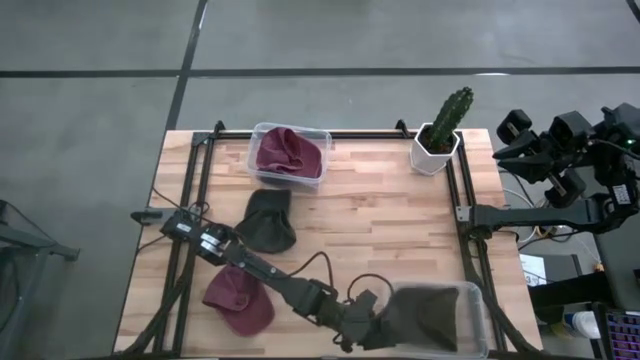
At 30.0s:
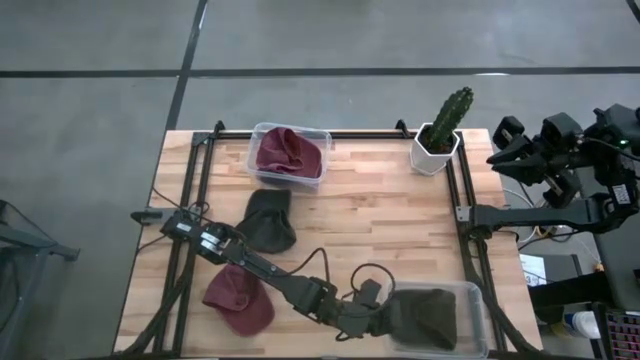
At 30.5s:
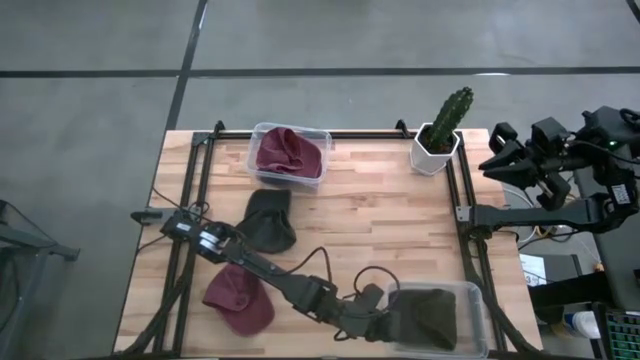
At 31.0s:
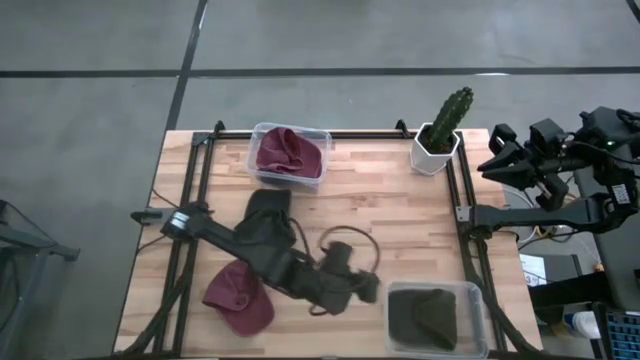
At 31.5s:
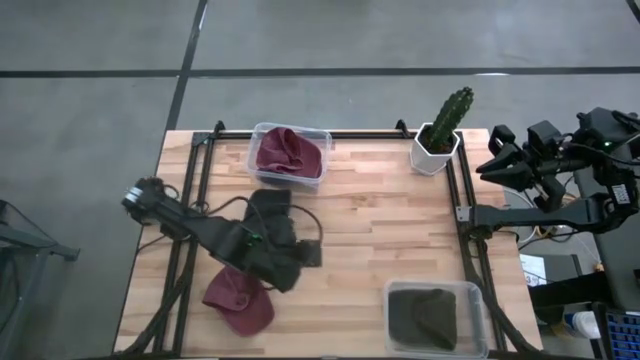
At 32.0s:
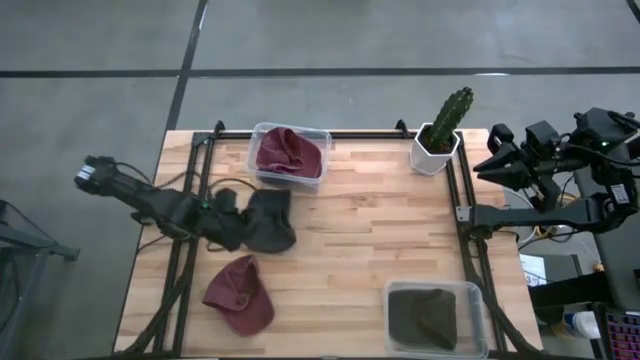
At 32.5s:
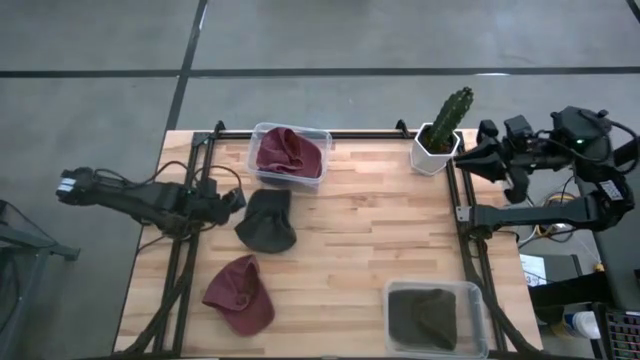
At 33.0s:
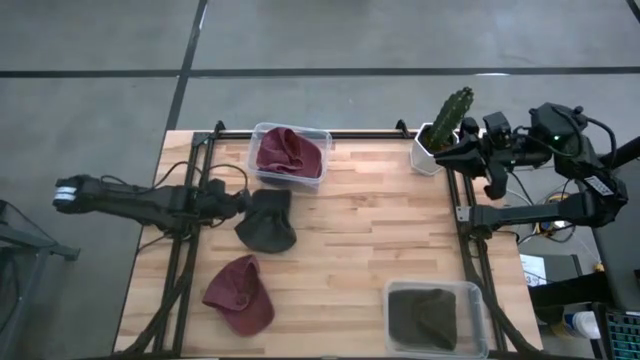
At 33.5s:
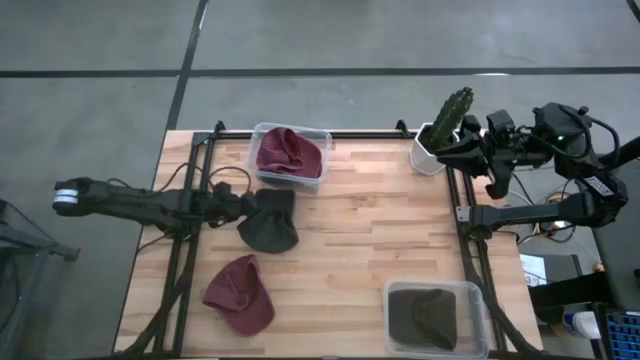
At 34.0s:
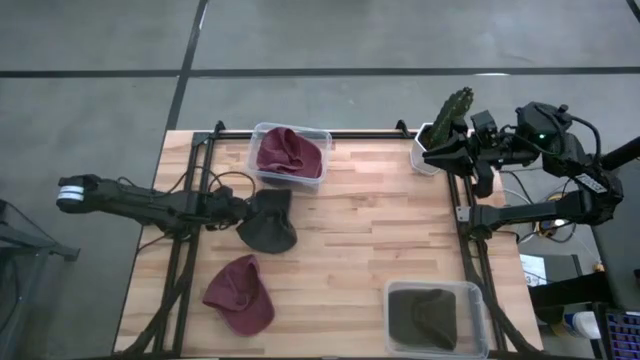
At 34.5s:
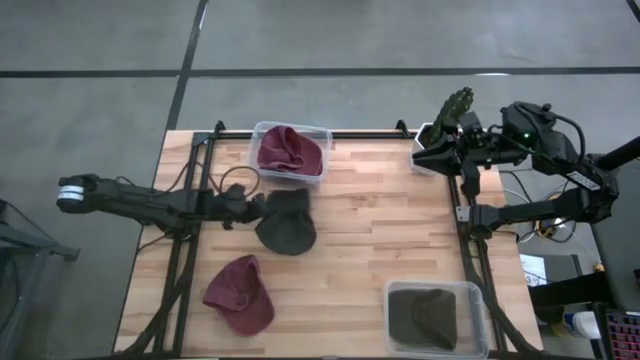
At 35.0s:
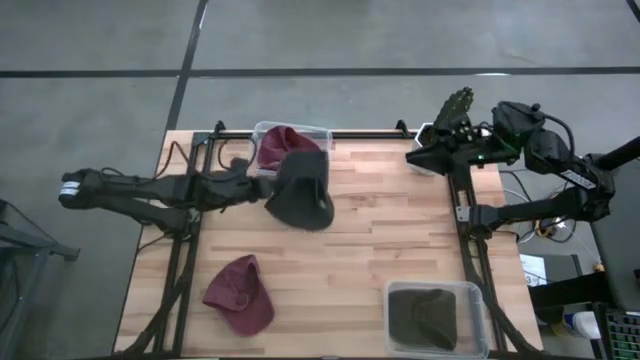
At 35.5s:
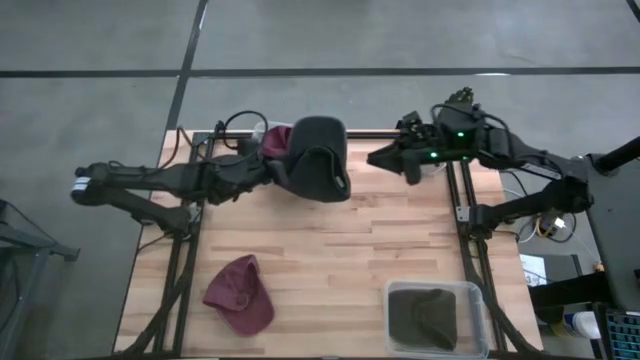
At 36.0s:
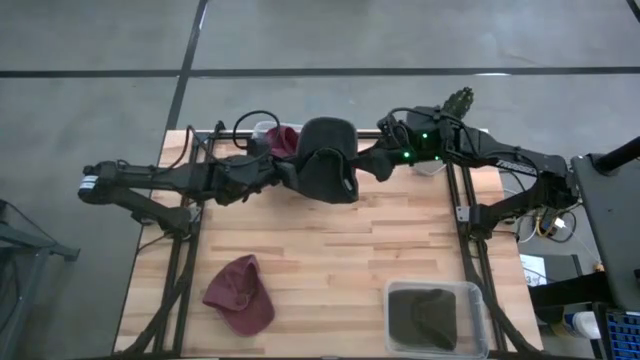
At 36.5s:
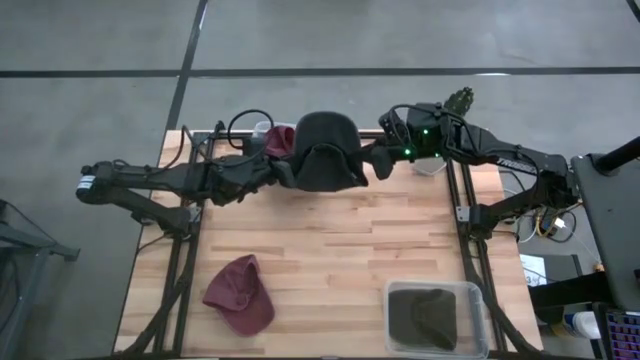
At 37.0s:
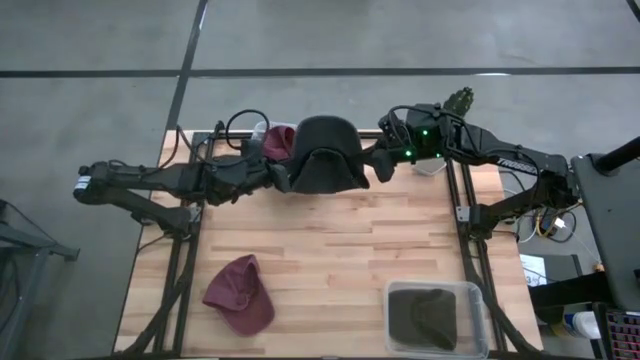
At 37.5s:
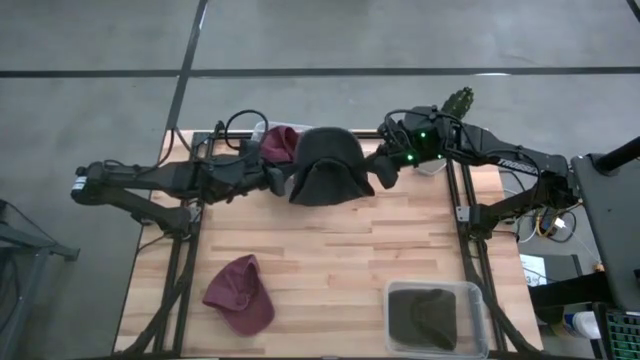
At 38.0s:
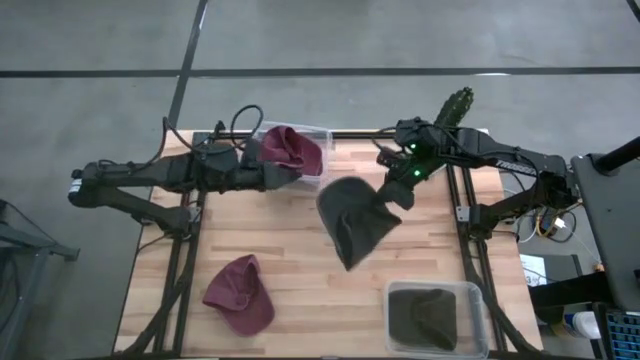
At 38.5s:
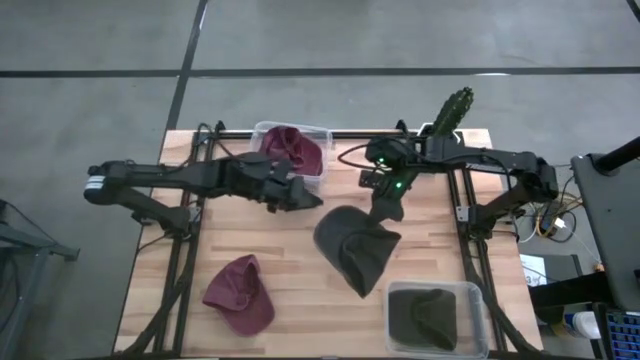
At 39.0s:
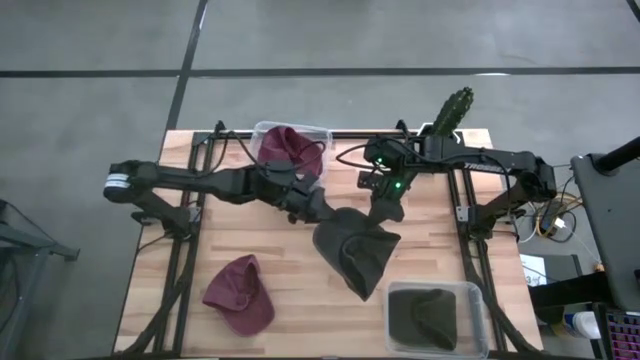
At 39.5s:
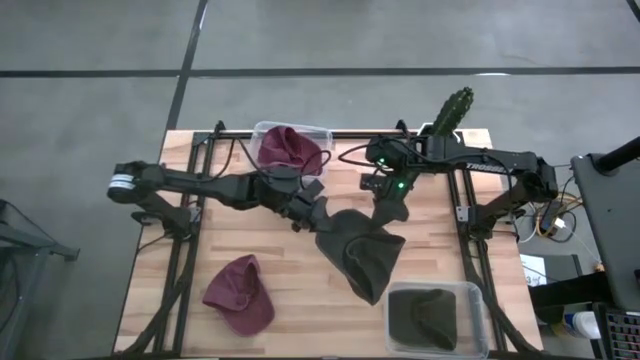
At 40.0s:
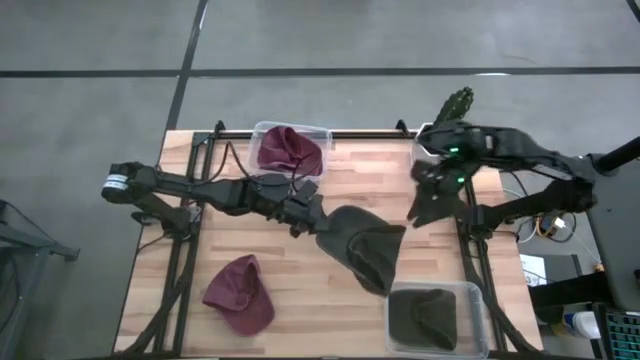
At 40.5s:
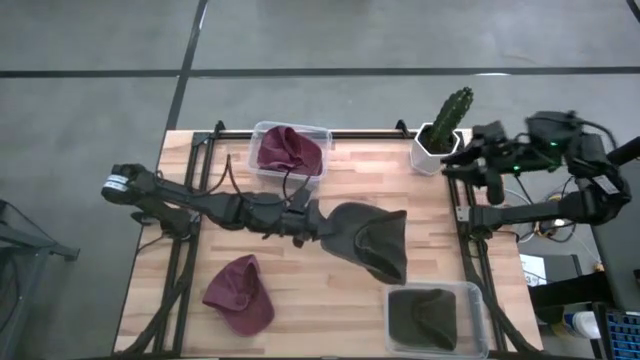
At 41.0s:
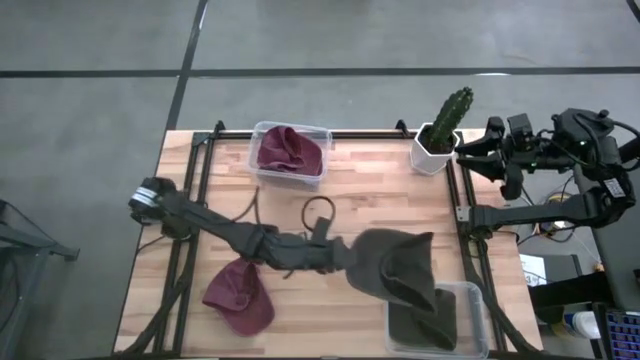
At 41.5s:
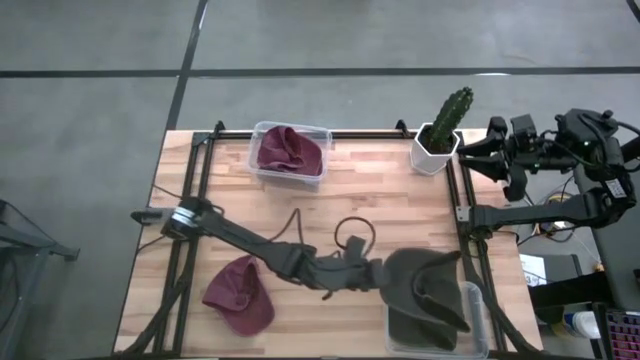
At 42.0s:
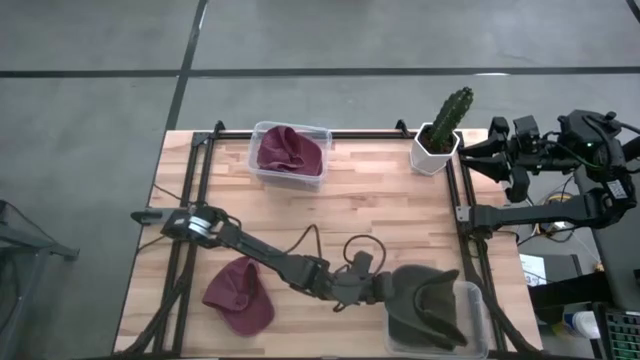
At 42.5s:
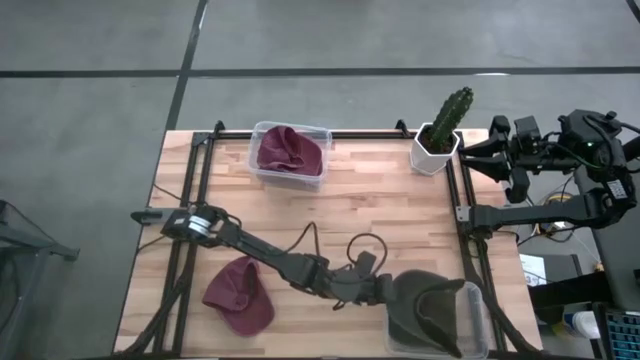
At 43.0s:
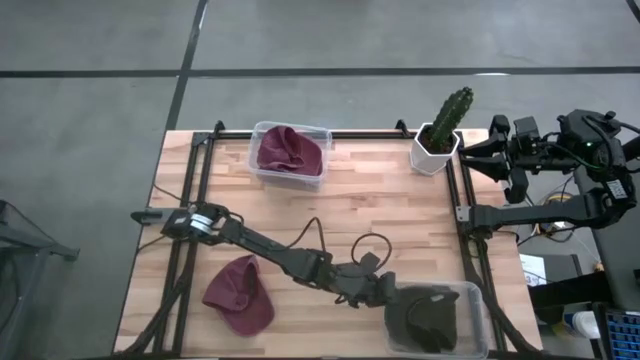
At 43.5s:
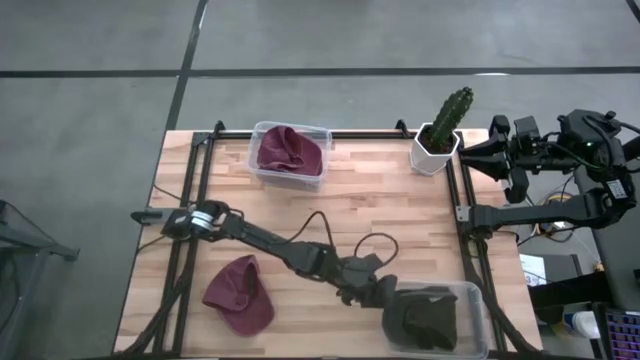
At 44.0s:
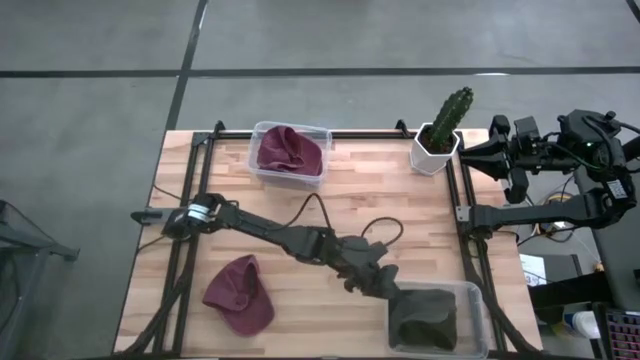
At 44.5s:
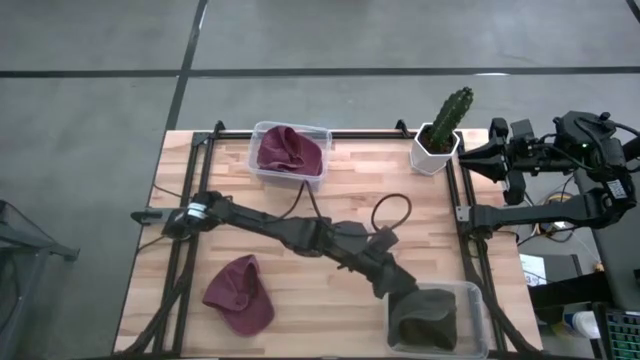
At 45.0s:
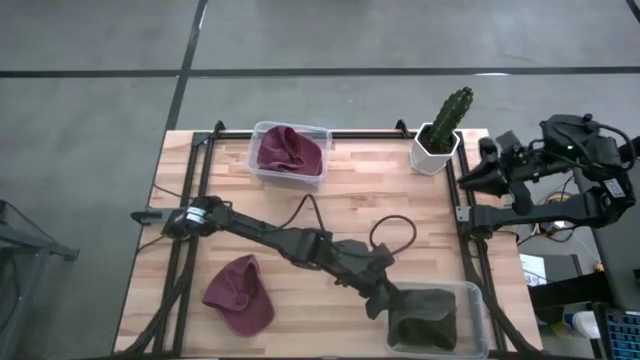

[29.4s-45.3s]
Task: Pick and place caps into container
Put the black cap into the bottom transparent container

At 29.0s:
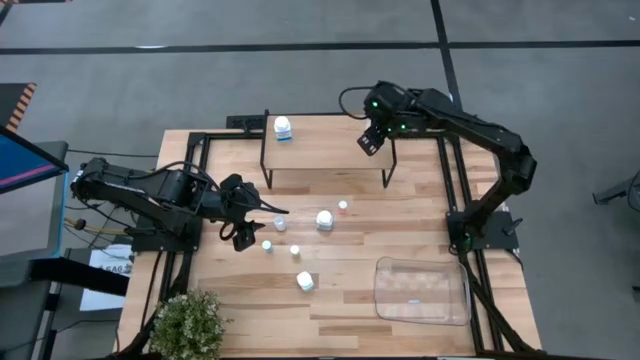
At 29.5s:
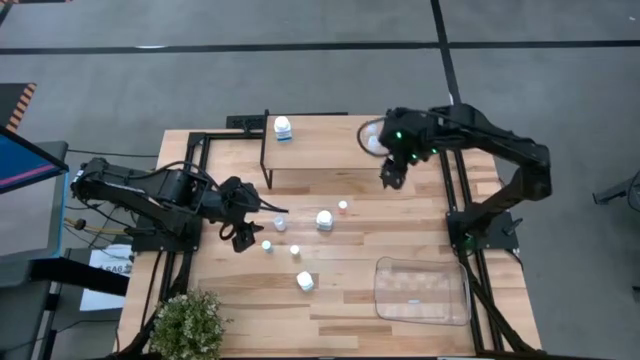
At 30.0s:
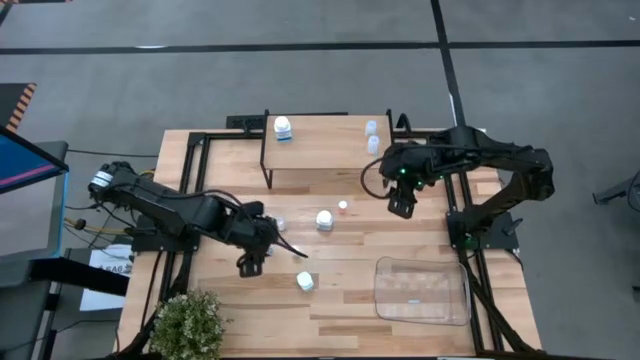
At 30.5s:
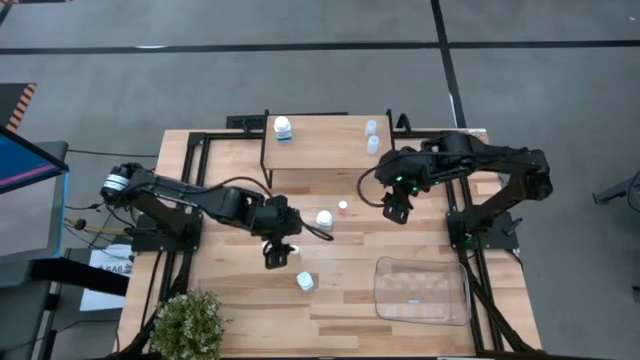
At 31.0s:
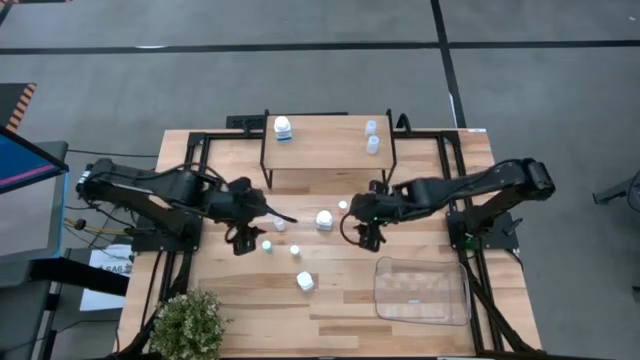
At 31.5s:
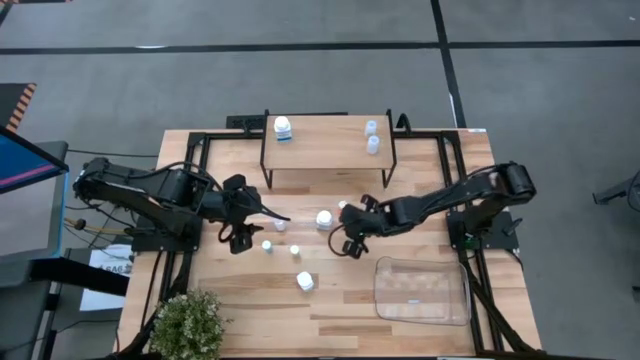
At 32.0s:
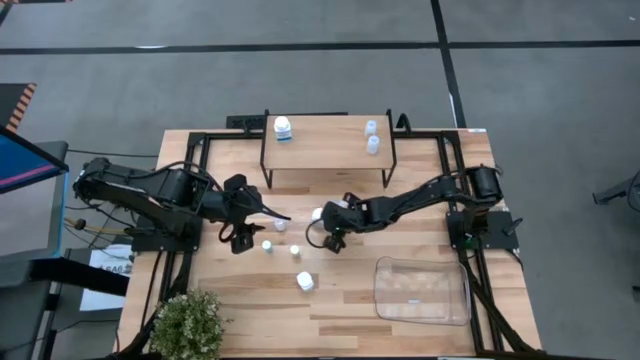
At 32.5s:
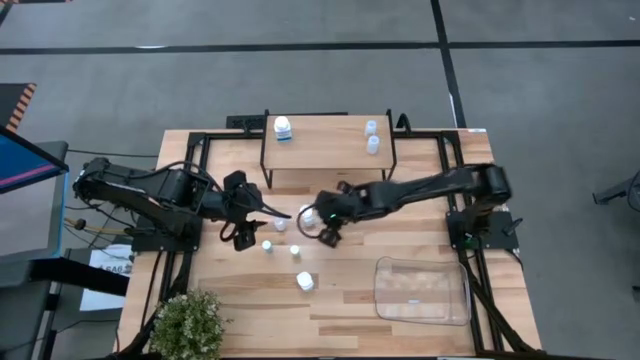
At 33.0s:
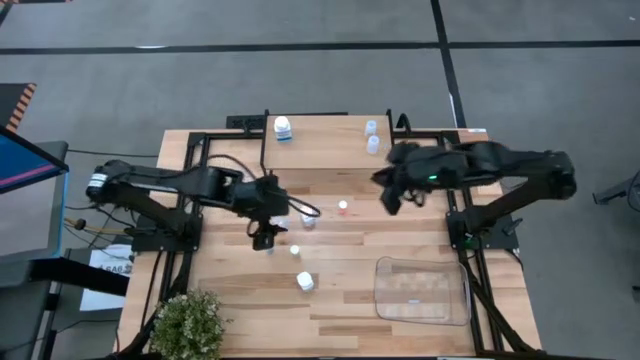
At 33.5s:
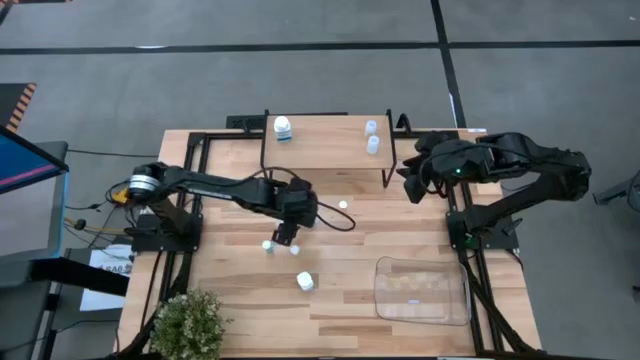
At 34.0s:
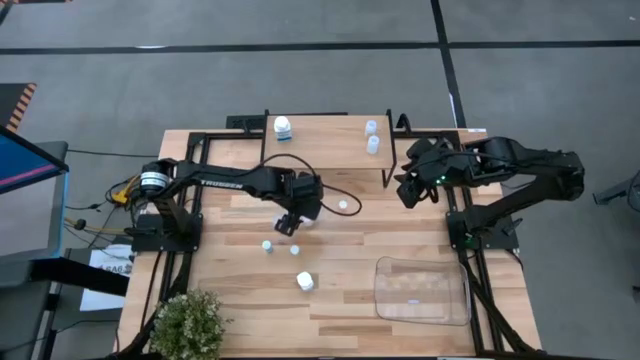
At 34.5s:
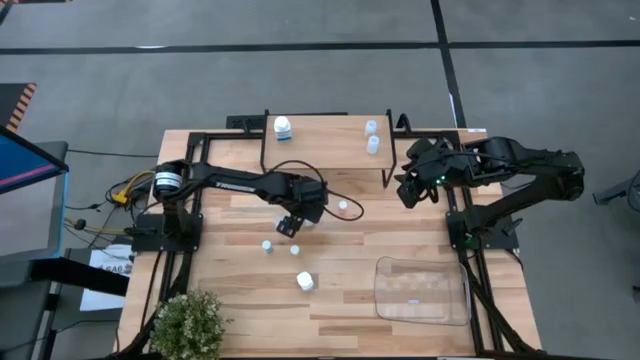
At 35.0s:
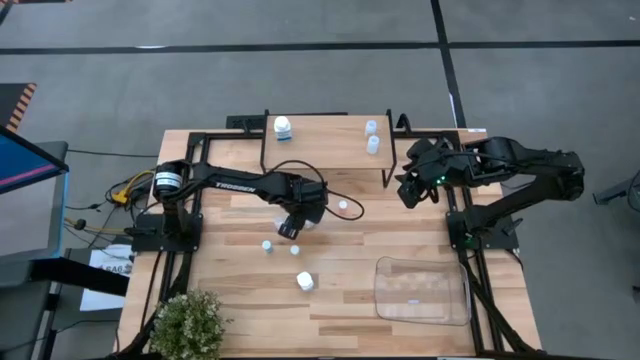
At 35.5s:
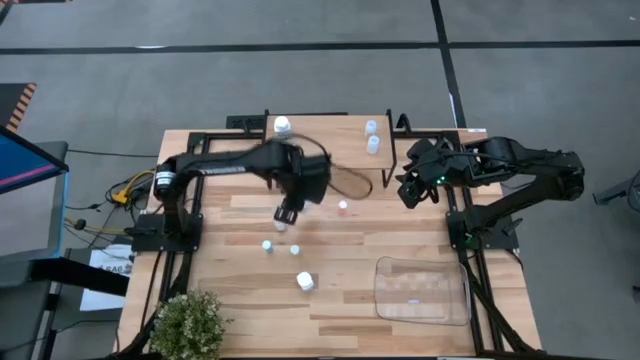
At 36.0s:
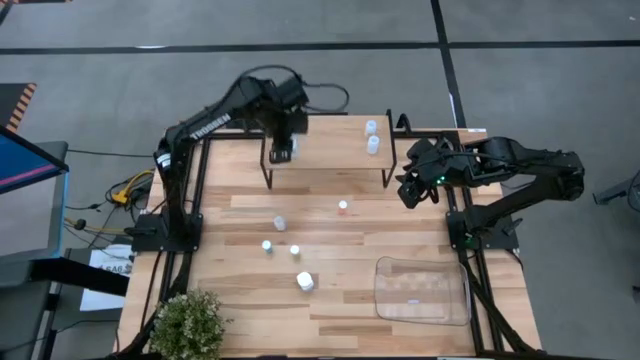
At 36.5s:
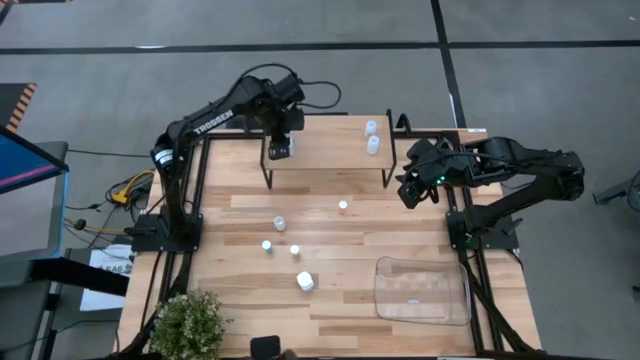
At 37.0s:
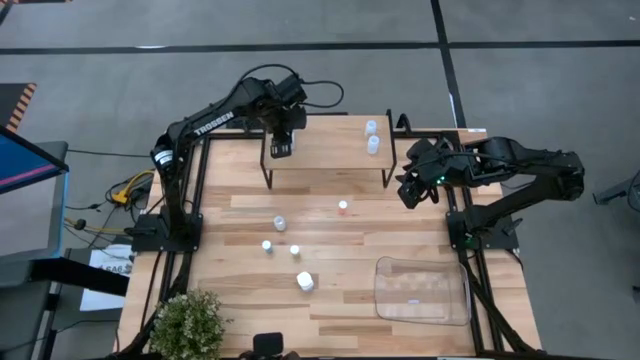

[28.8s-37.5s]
Task: Pick and place medicine bottles onto shelf by color
Put the top white pill bottle on the shelf aligned with the other white pill bottle
